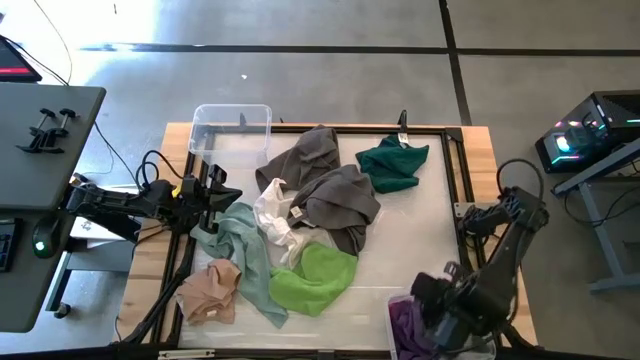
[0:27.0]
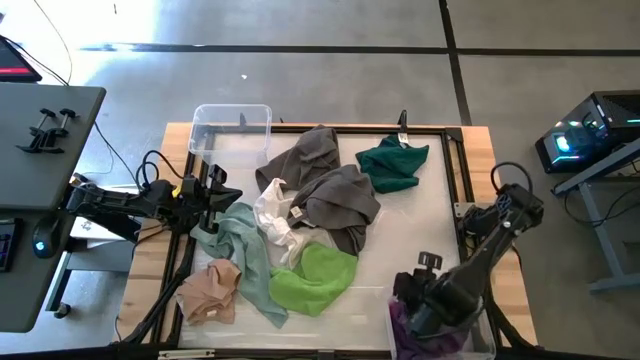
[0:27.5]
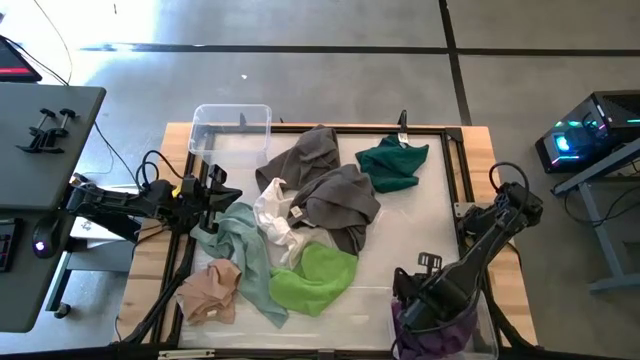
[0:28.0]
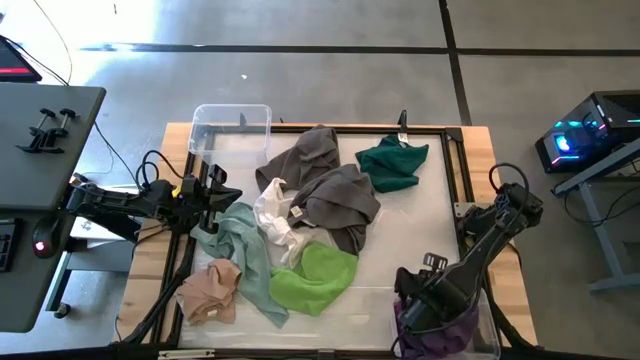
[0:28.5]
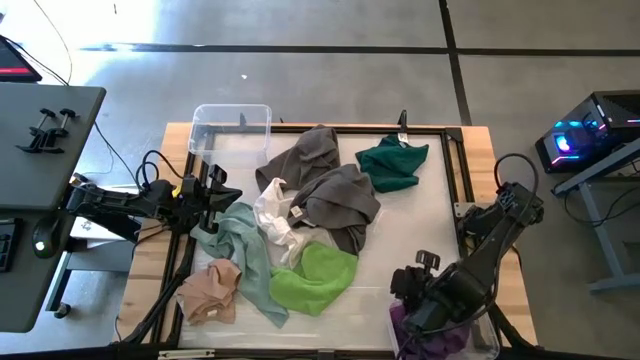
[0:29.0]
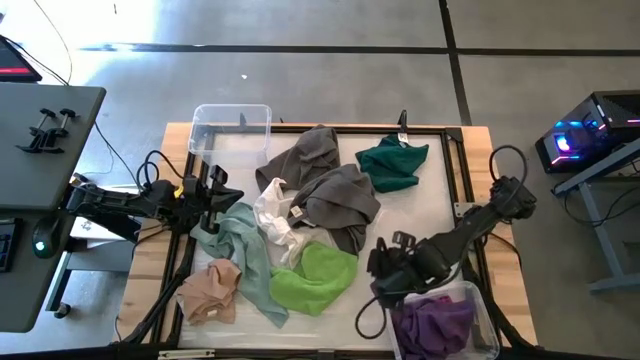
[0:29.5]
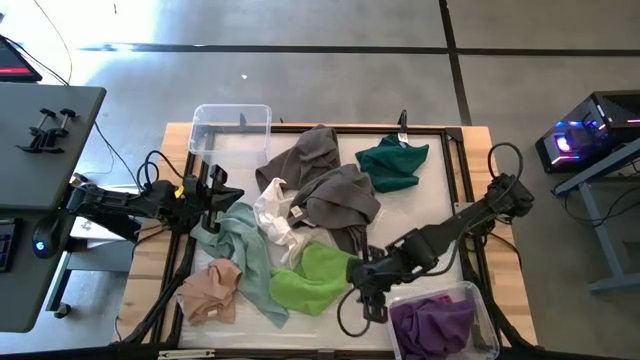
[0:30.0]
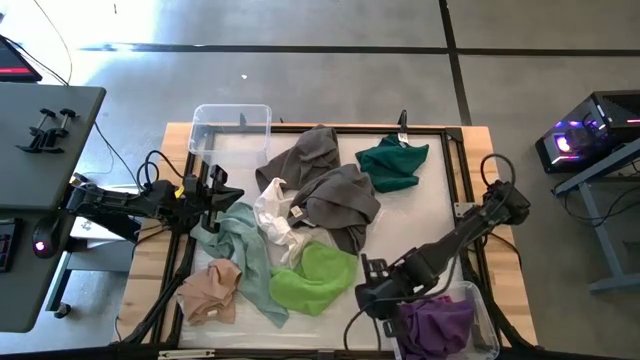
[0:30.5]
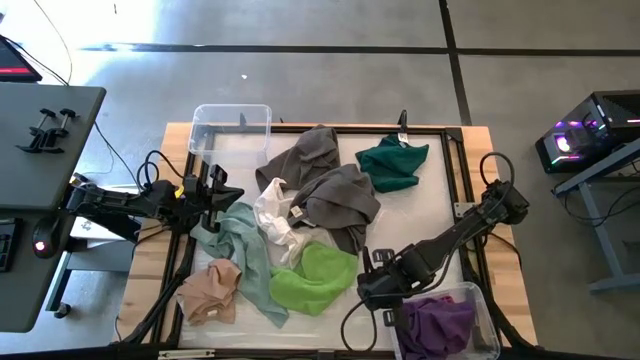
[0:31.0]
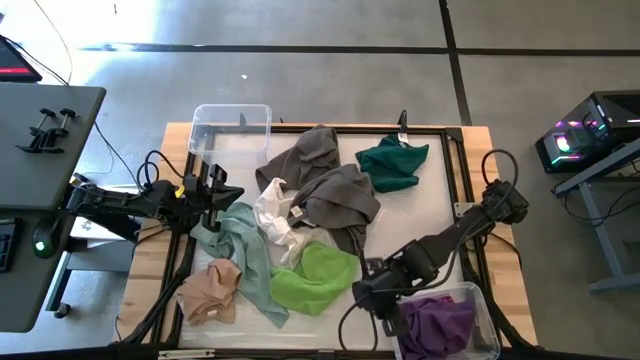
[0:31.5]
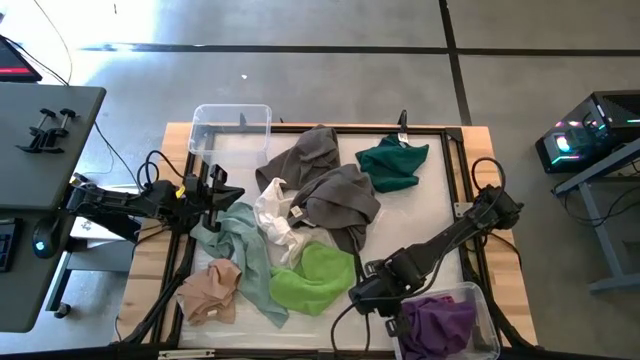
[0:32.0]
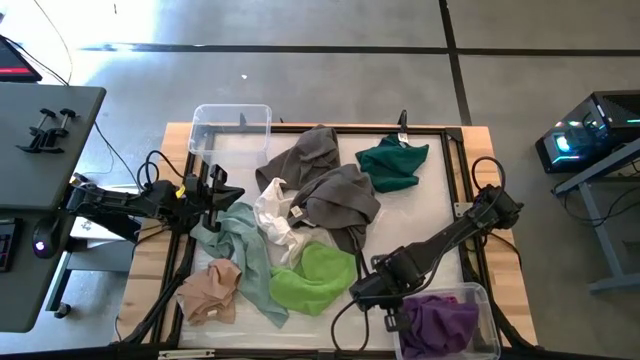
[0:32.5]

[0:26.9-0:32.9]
Task: Sort towels by color in basket
Adjust the bottom transparent bin

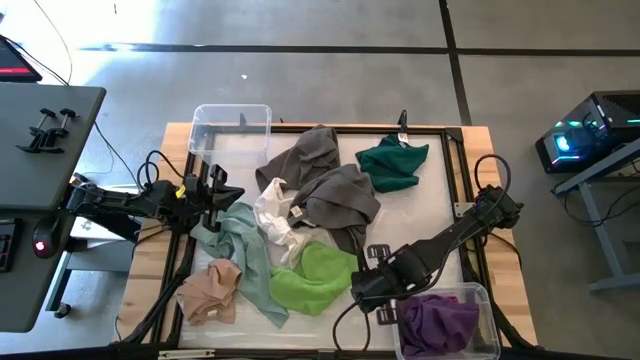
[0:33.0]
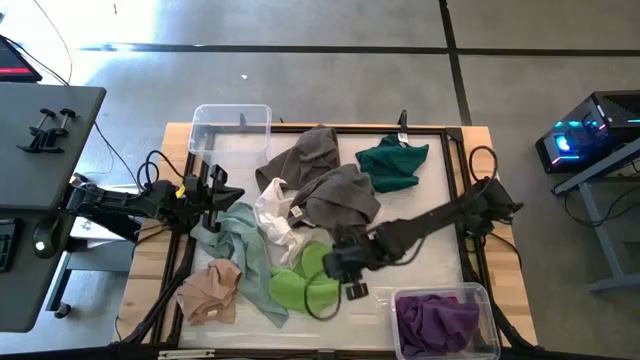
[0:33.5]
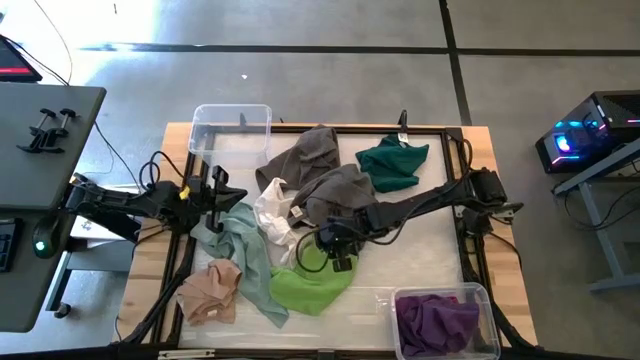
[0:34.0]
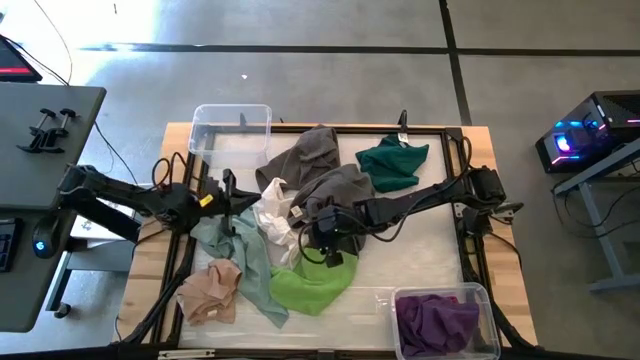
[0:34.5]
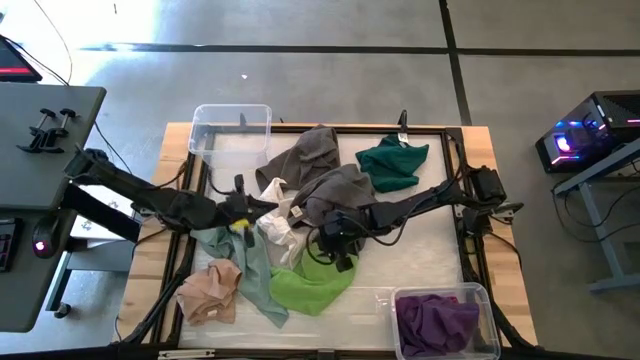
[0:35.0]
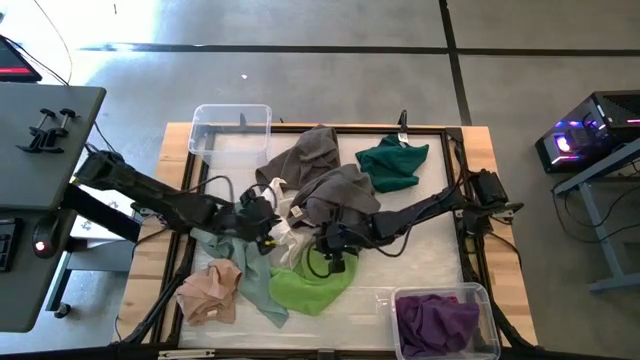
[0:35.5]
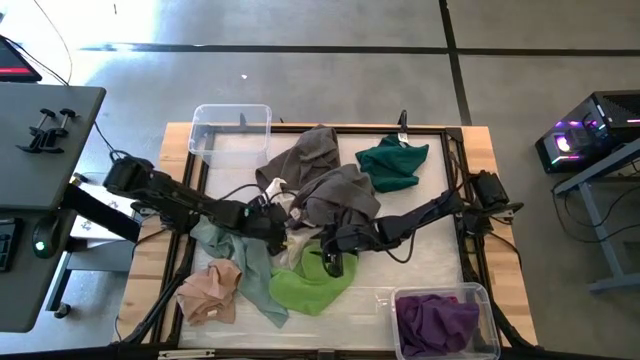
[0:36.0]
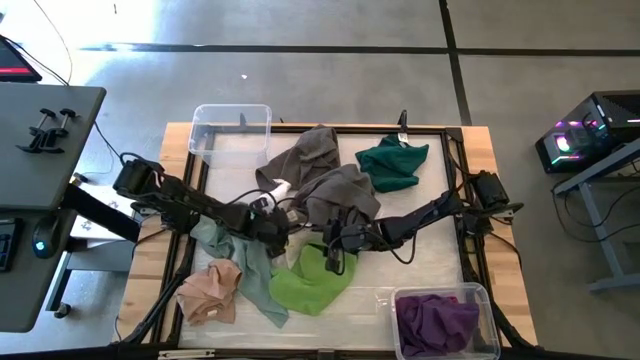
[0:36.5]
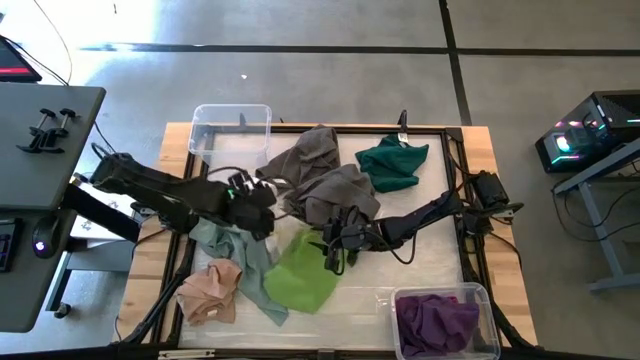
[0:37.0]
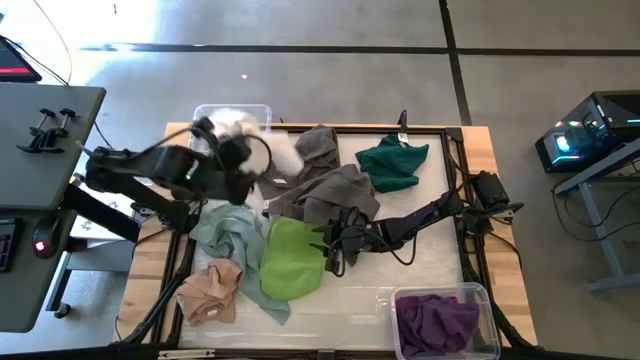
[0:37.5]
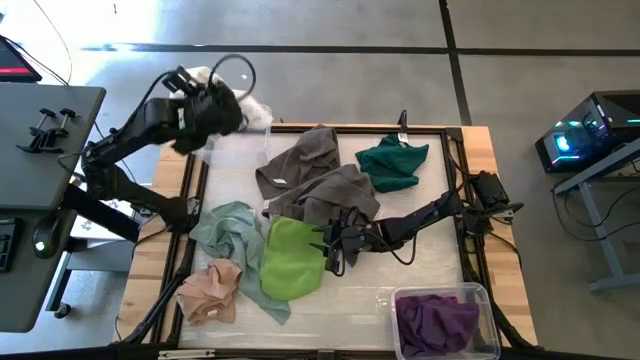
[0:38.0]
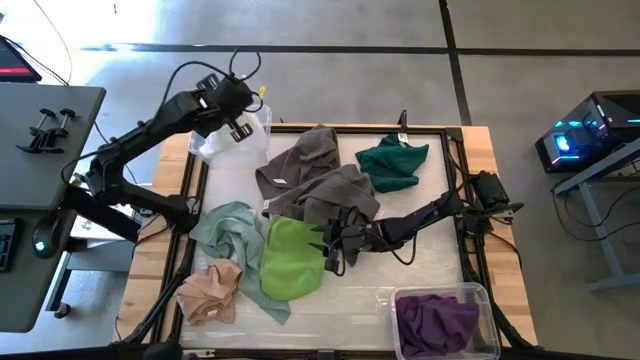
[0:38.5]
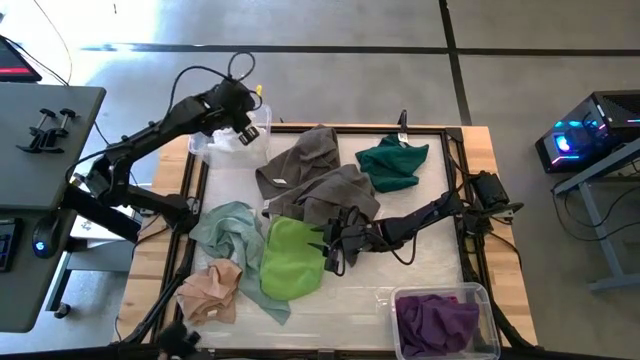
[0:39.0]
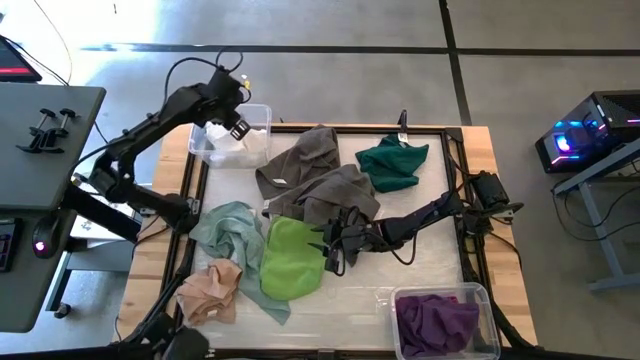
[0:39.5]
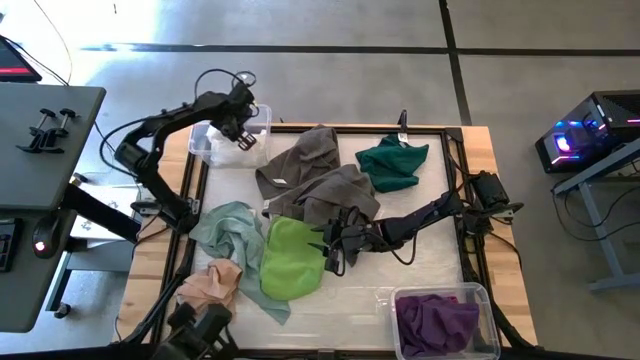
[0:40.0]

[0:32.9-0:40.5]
Put the white towel into the top transparent bin

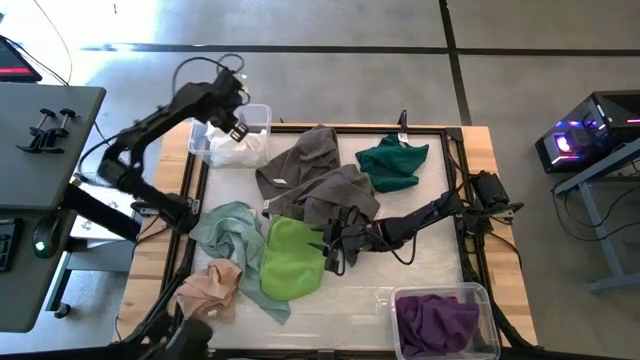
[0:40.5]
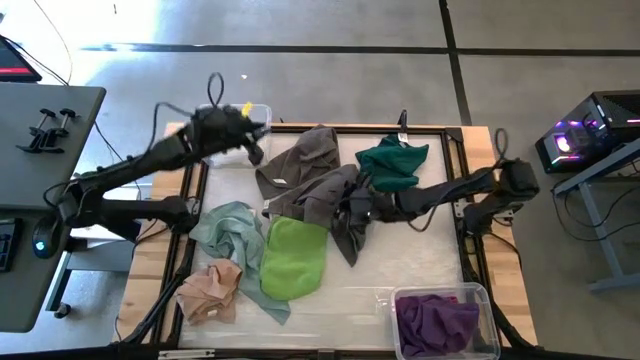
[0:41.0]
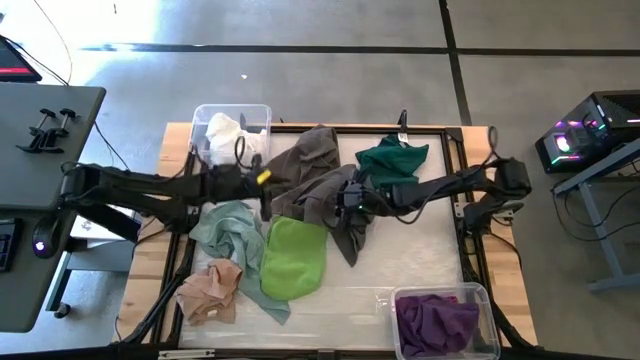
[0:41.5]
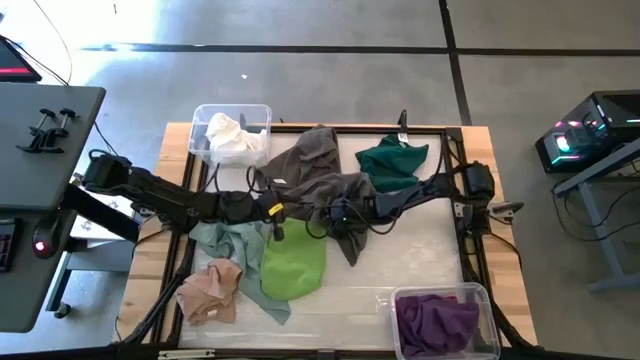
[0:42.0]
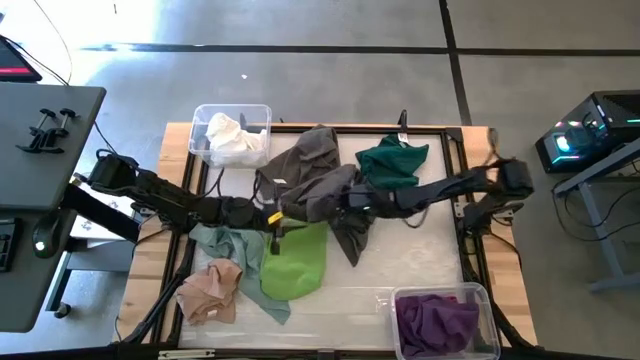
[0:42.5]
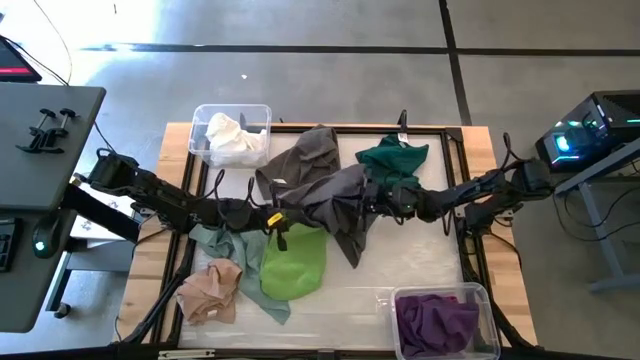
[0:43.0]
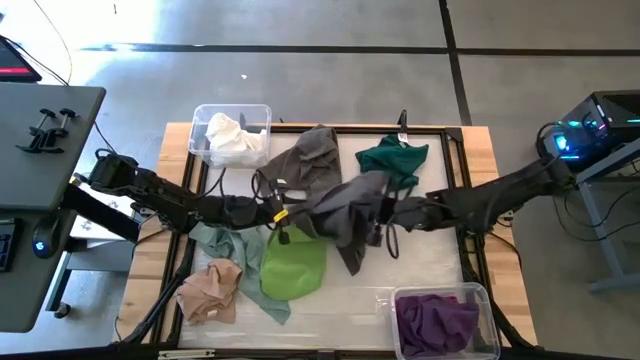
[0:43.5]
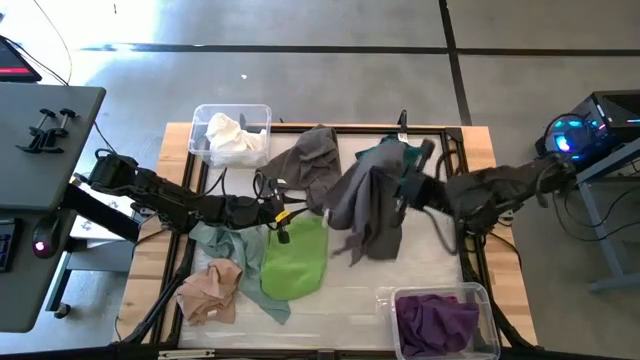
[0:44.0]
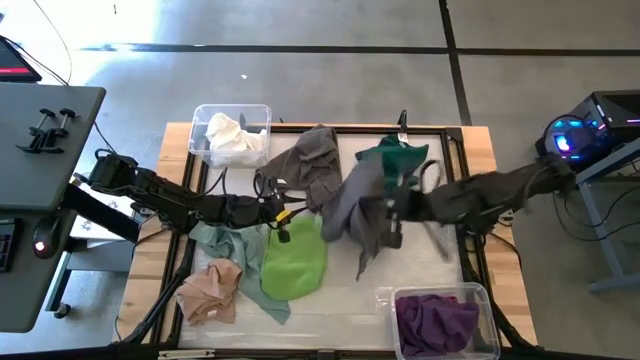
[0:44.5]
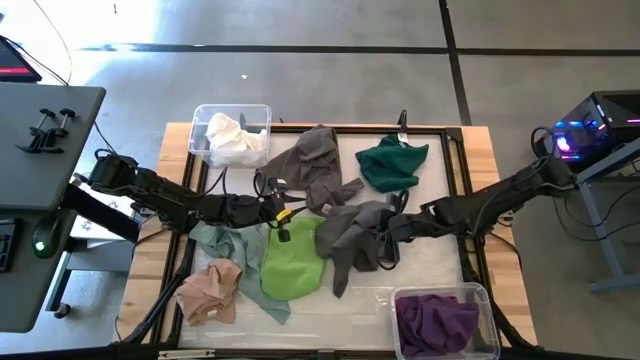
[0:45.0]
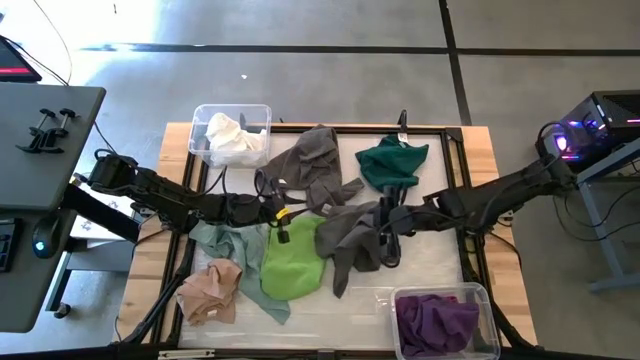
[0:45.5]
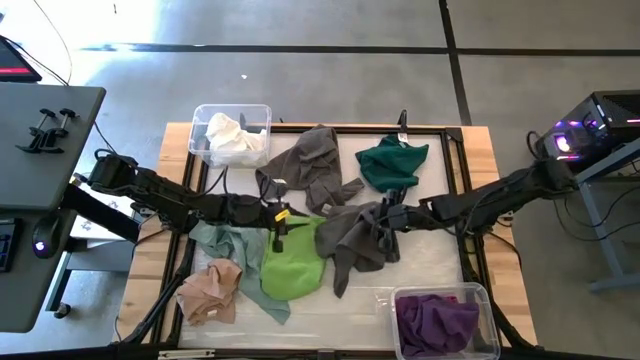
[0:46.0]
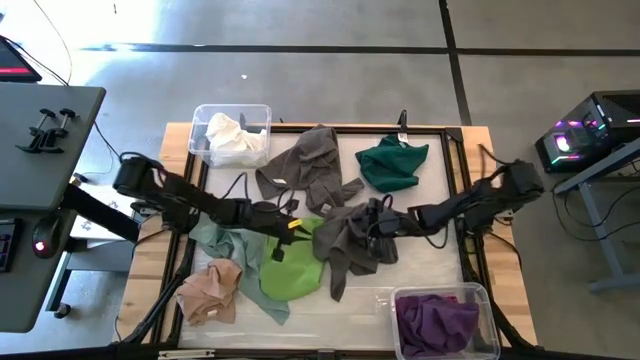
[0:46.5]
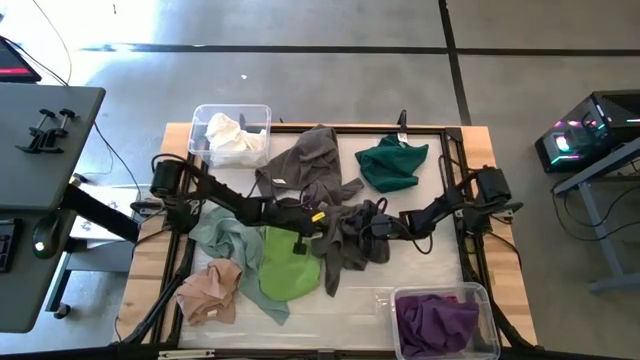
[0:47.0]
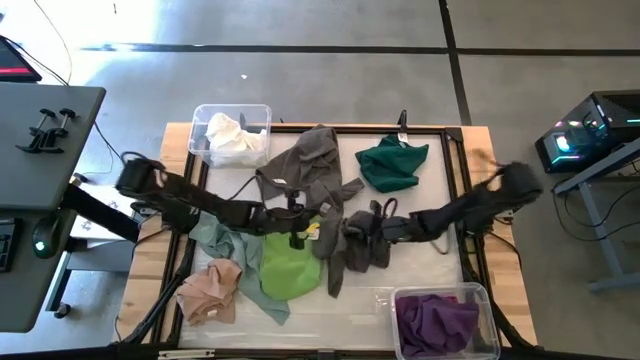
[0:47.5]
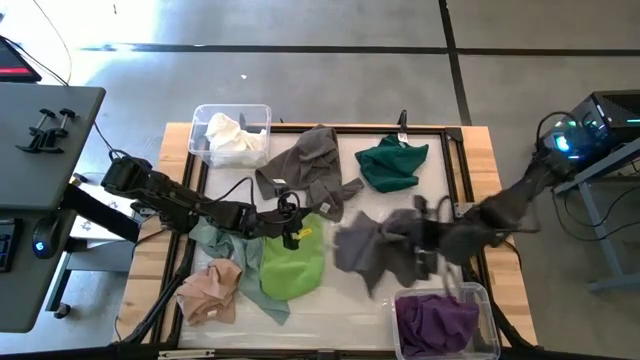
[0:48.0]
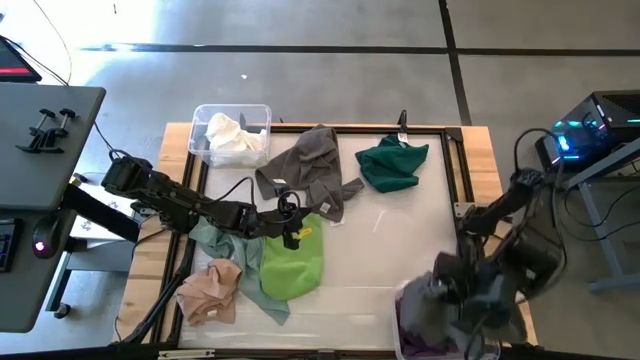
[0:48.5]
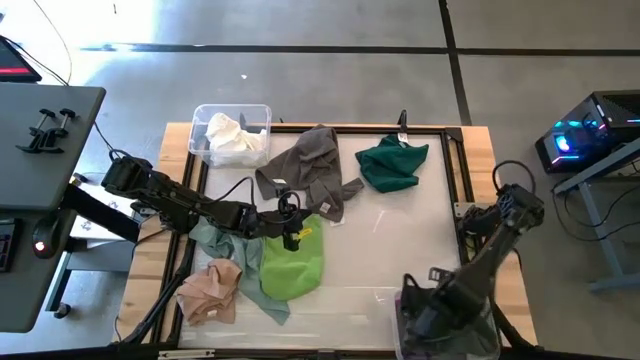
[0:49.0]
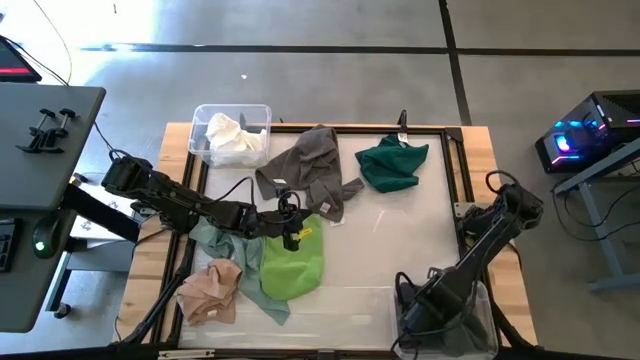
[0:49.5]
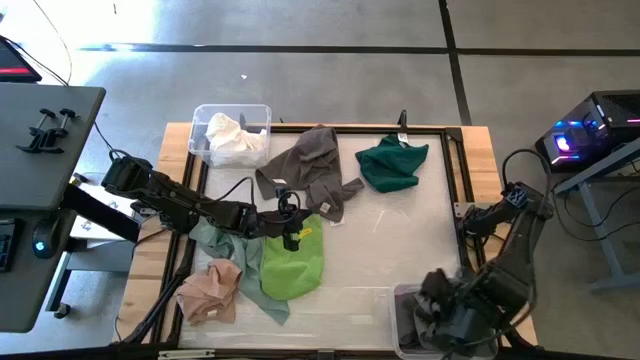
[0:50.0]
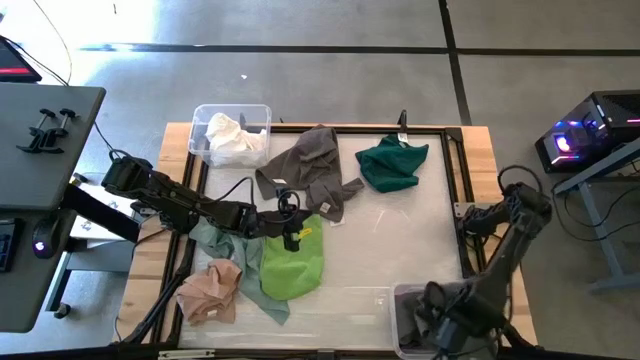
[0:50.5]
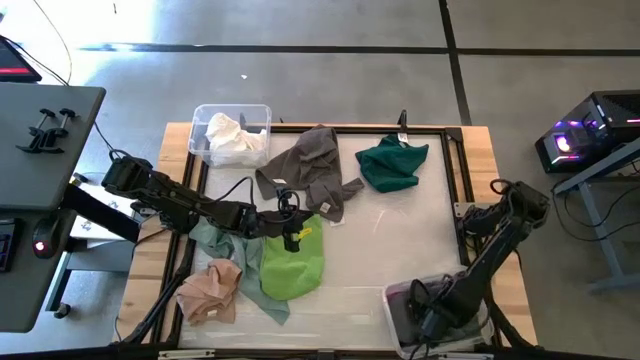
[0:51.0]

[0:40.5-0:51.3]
Put the gray towel into the bottom transparent bin
